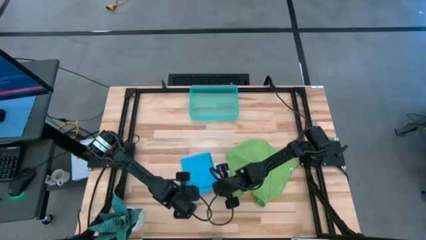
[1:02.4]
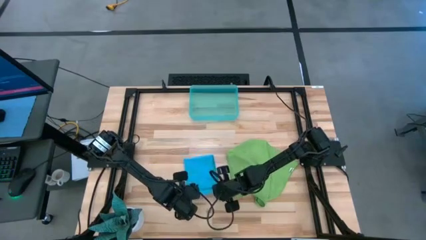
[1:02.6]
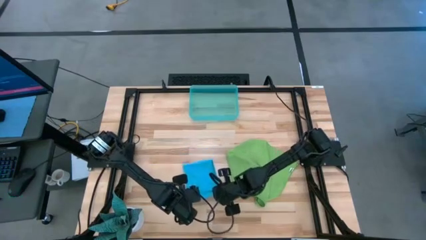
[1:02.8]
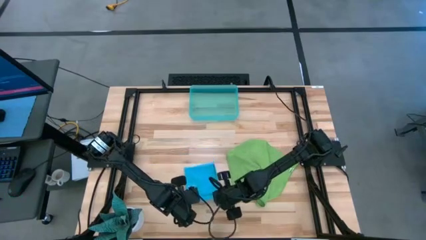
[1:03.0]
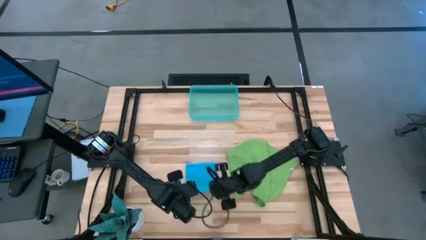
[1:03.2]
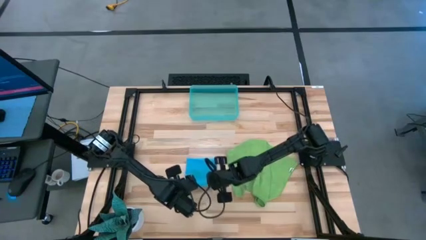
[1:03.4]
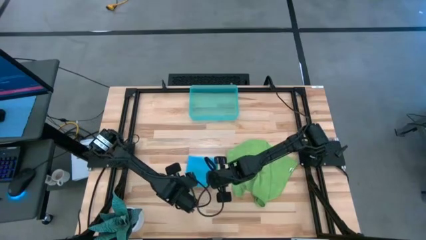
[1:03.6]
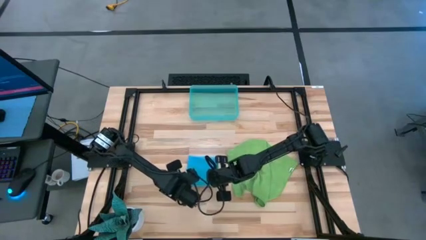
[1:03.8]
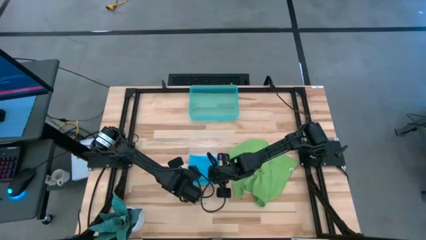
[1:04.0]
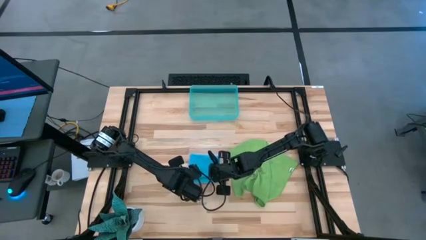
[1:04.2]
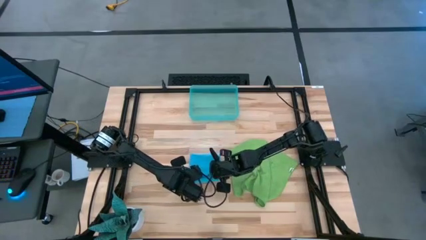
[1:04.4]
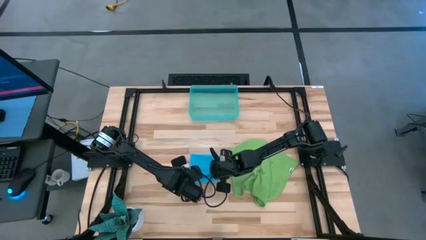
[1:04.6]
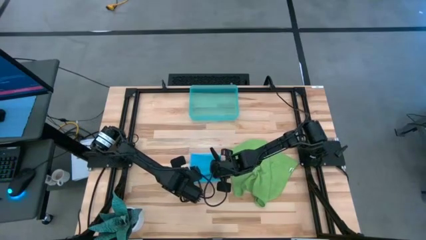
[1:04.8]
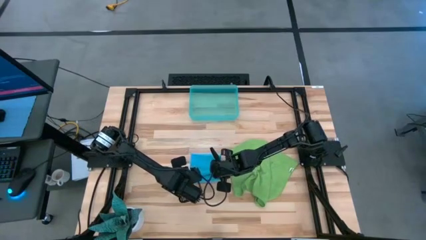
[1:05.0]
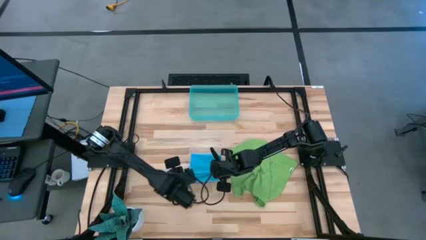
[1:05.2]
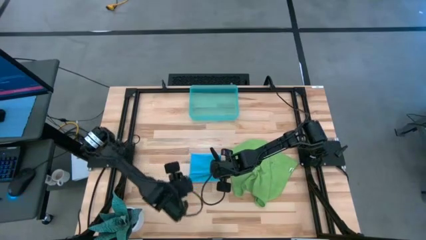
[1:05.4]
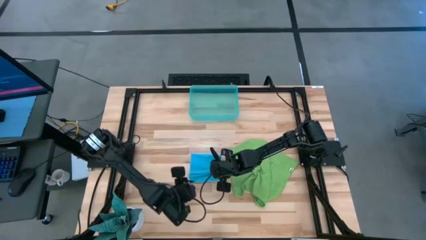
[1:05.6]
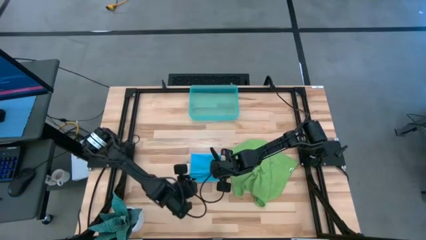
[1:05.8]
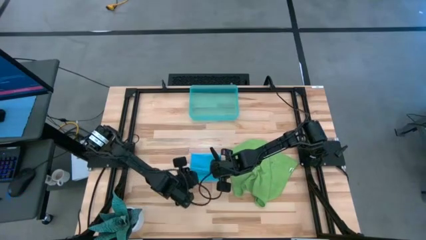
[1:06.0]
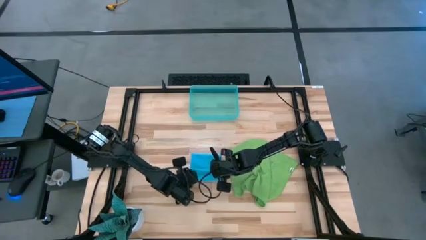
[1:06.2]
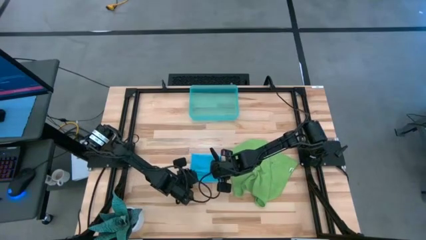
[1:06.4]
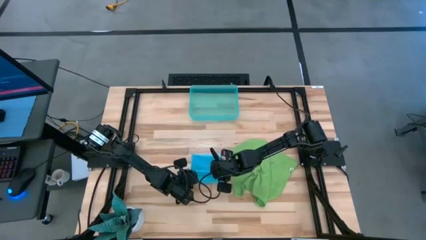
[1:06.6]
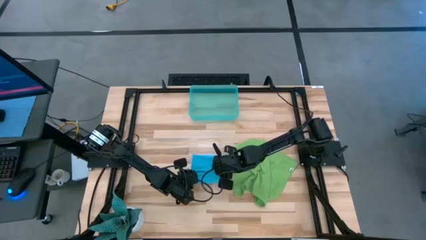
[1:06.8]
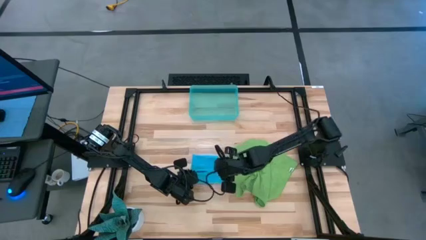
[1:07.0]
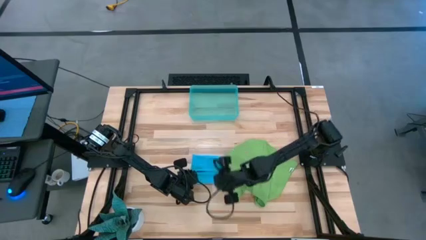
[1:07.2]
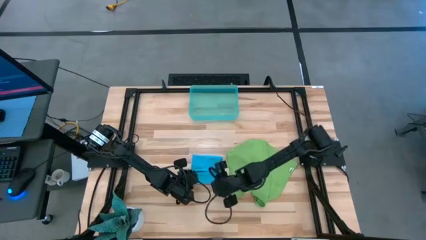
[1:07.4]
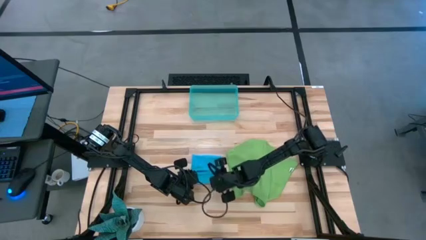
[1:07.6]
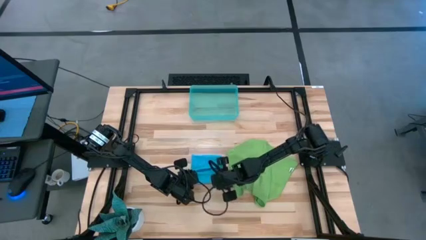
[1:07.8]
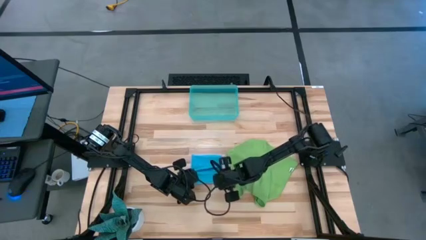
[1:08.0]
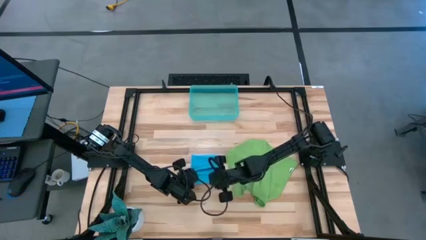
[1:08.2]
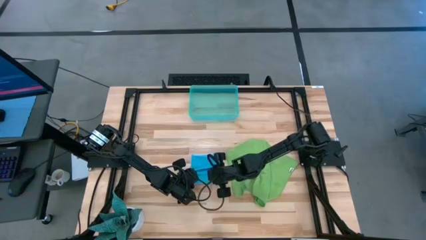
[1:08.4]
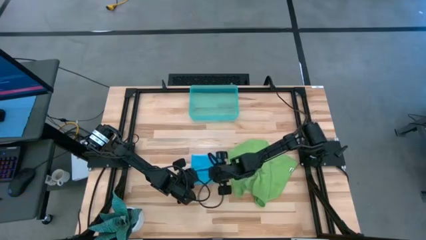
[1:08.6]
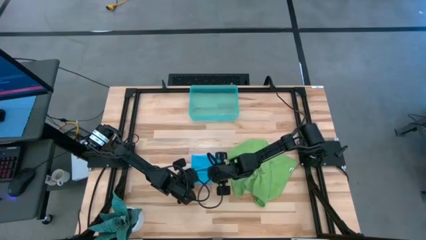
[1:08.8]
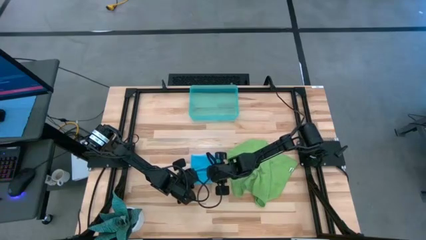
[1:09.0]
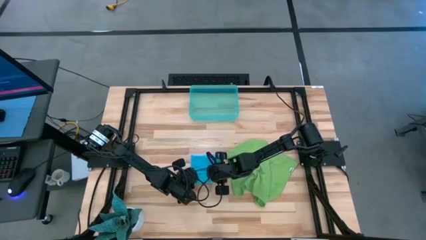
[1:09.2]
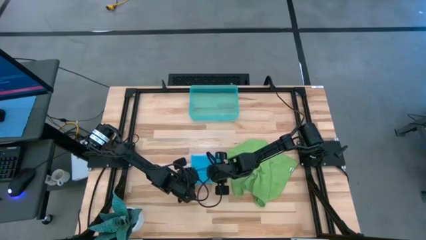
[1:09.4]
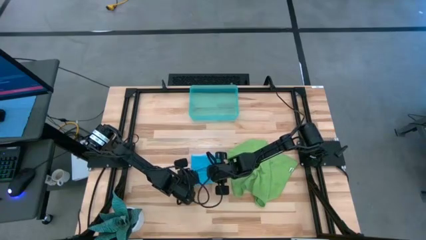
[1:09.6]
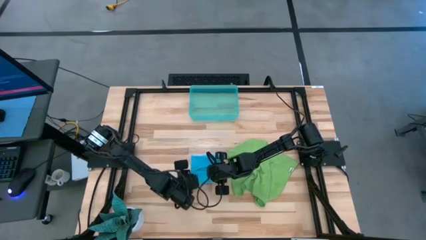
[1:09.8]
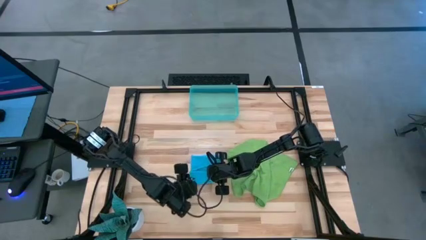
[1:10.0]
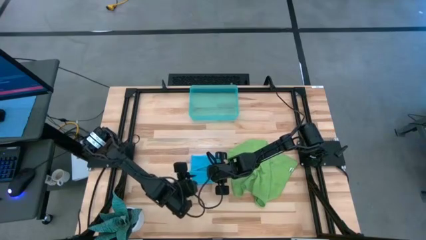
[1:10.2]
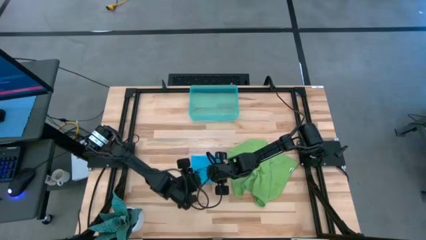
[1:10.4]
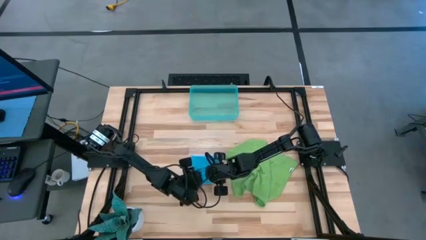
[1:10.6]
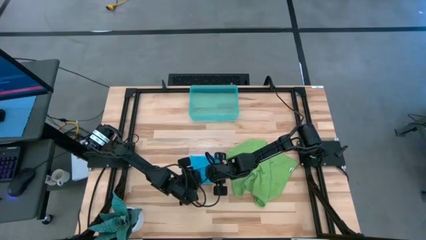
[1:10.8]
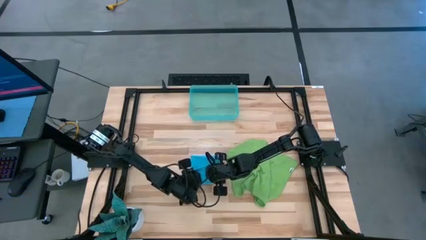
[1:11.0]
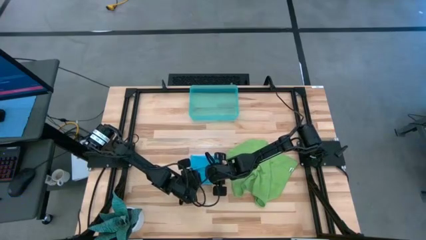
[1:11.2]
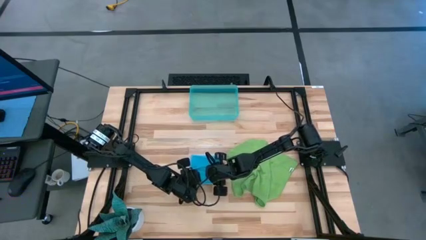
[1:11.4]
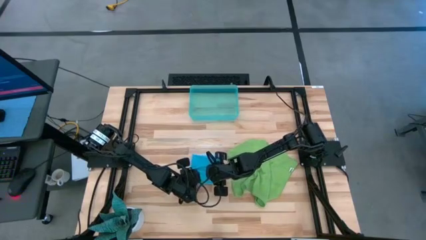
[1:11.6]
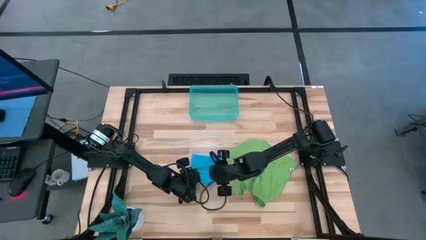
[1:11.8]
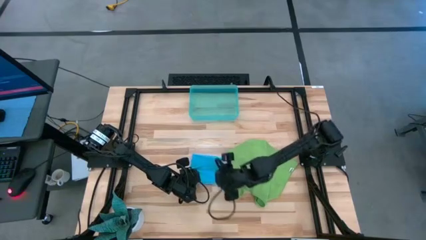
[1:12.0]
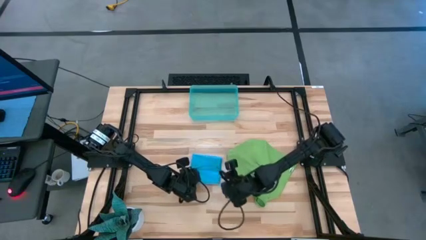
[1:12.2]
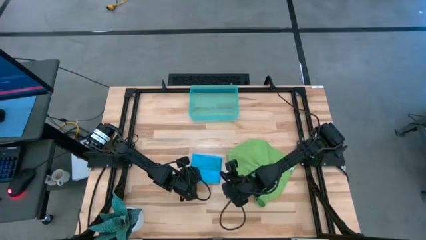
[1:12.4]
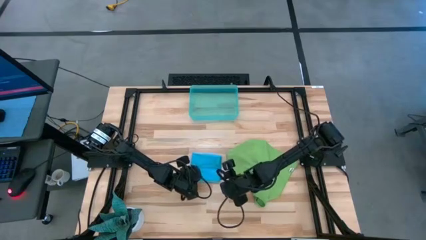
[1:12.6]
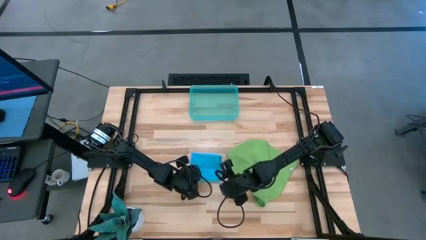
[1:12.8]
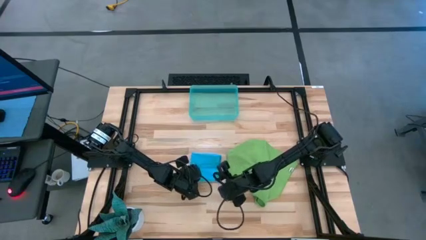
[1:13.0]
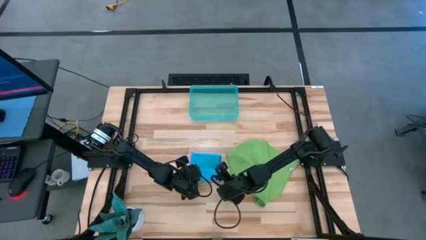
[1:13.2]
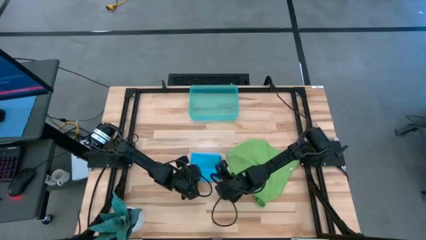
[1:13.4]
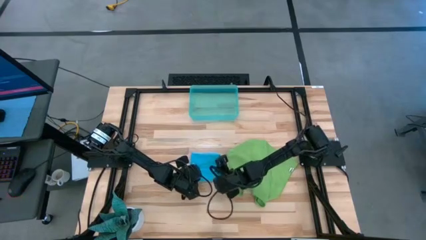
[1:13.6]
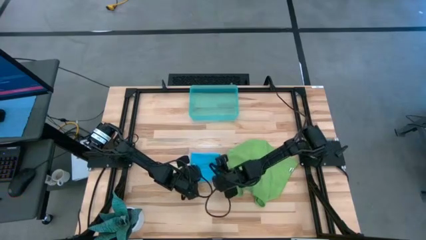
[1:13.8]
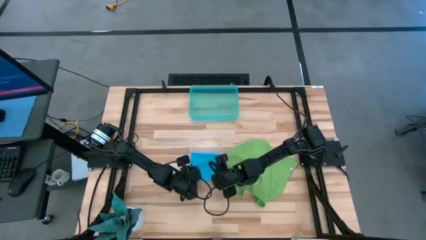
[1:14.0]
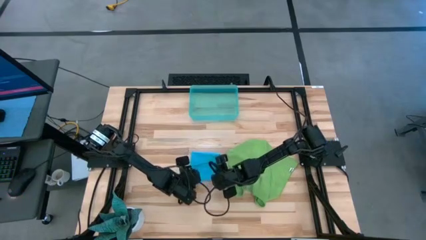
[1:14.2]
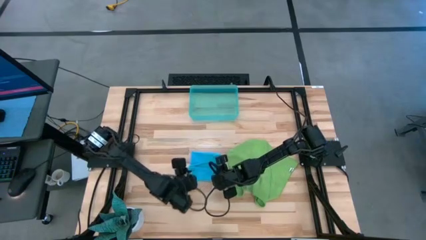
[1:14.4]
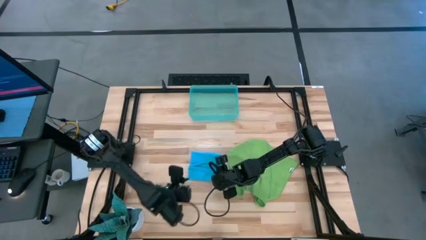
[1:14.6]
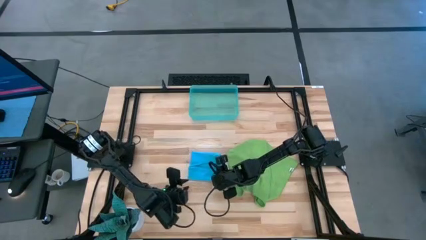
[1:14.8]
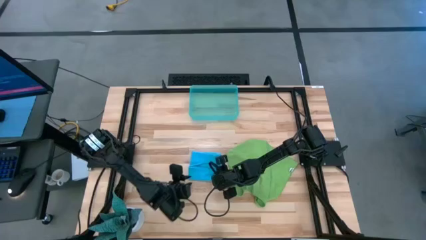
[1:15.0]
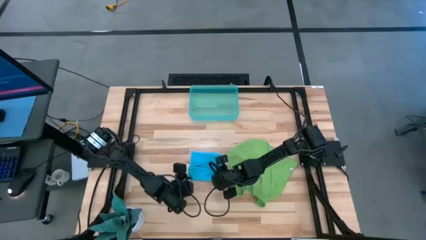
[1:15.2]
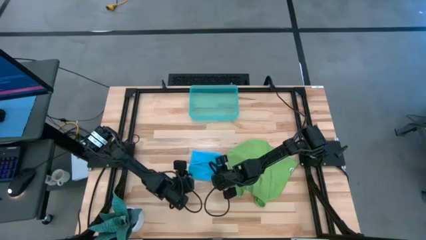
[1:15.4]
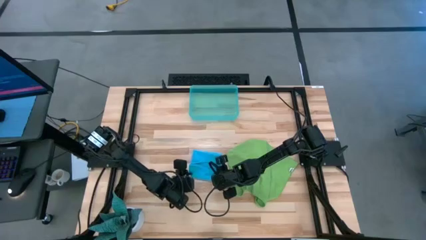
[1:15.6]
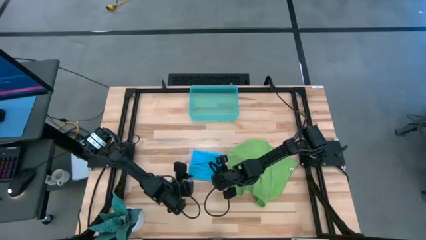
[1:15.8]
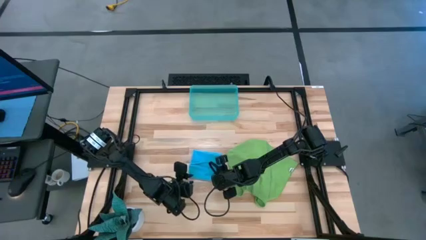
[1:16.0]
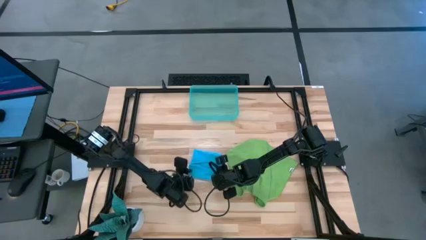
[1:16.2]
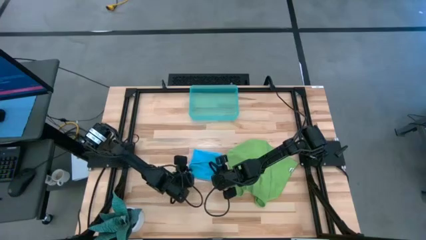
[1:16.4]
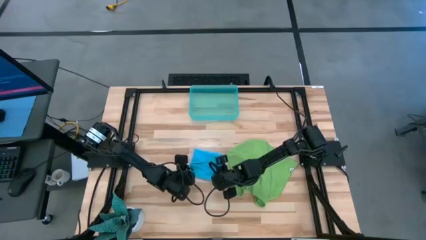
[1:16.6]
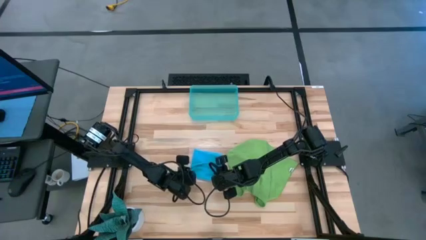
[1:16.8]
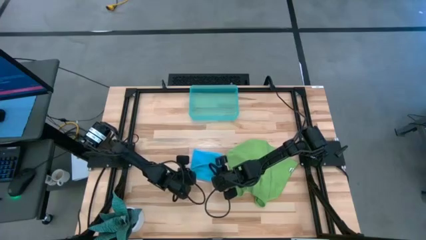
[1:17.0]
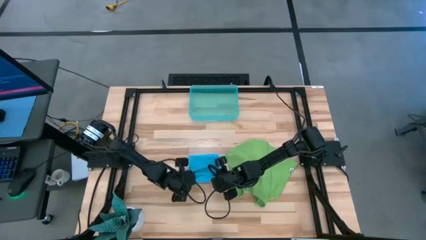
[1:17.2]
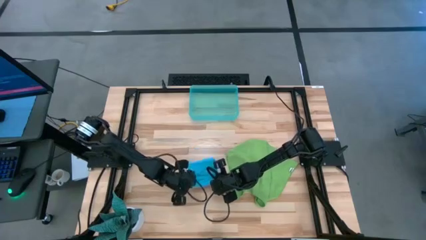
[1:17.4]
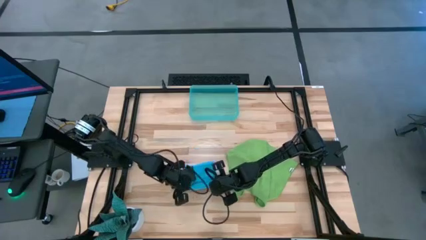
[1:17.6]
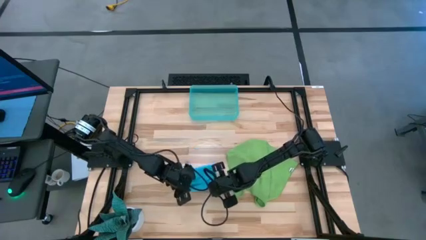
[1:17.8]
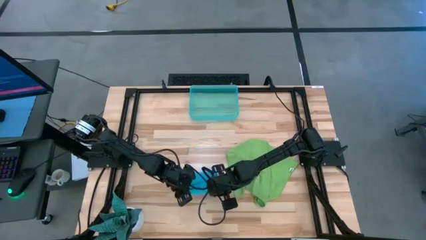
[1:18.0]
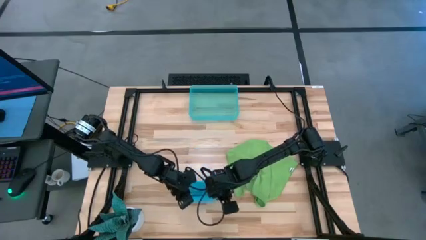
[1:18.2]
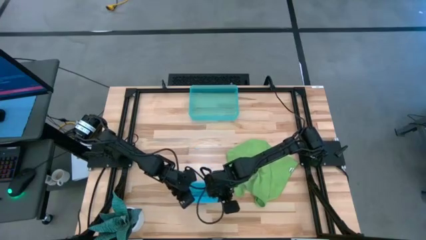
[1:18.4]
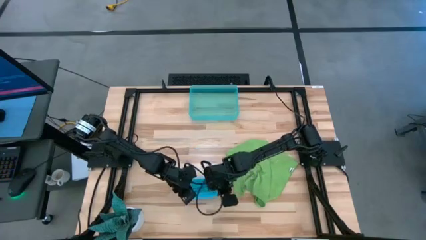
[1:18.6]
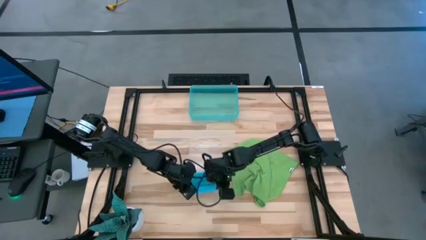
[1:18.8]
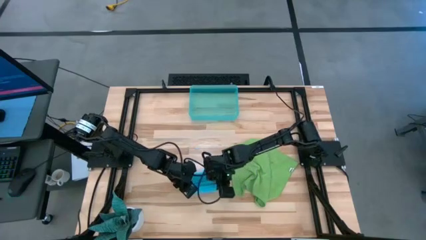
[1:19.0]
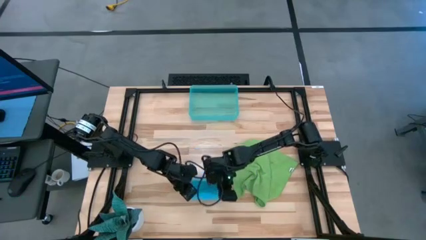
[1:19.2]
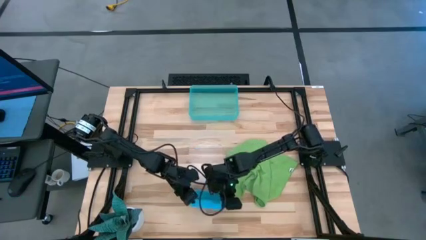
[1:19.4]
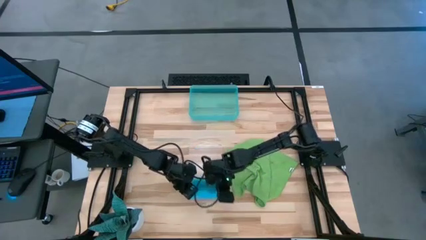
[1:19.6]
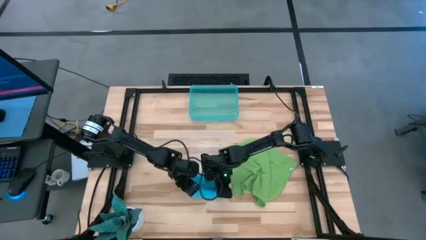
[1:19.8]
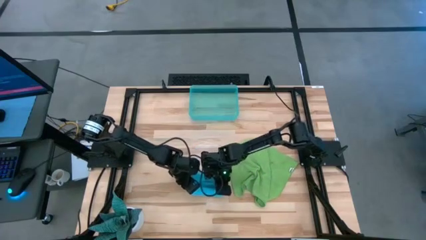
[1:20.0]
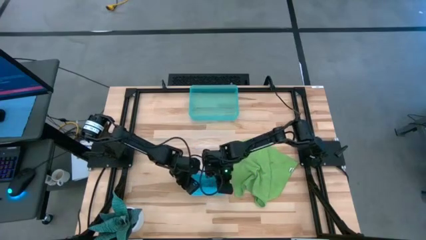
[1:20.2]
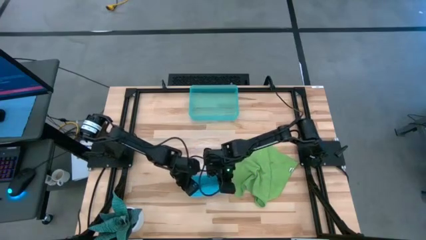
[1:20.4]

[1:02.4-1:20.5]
Task: Roll microfiber towels into tight, uniform cylinder then place into a basket
Roll the blue microfiber cloth
